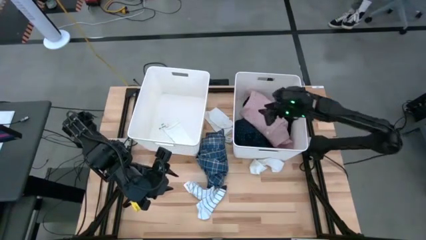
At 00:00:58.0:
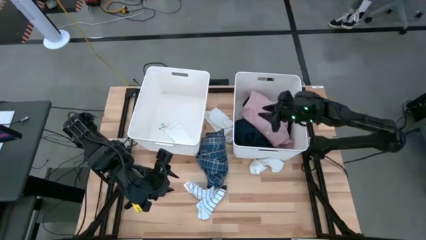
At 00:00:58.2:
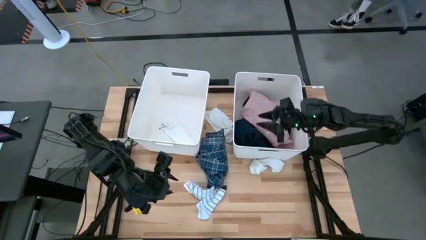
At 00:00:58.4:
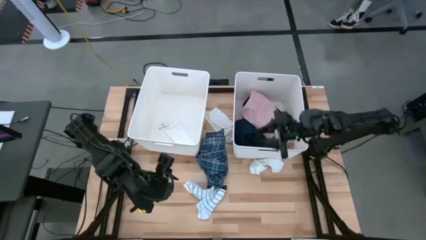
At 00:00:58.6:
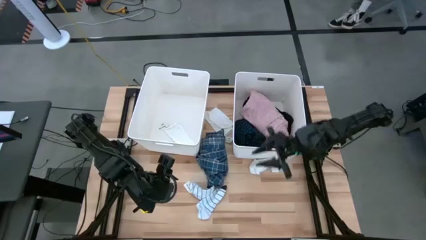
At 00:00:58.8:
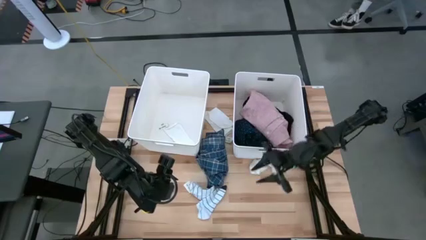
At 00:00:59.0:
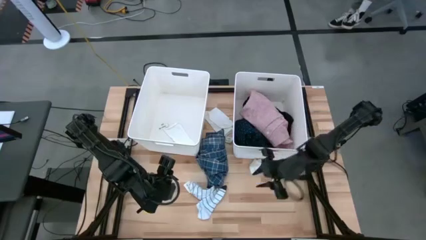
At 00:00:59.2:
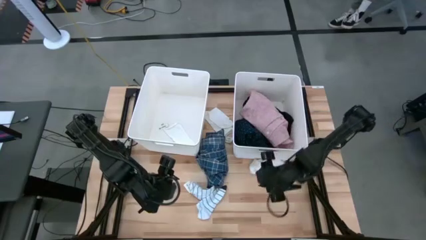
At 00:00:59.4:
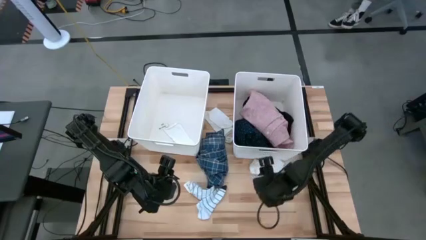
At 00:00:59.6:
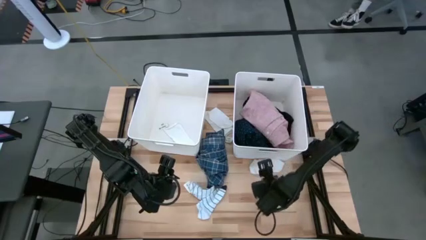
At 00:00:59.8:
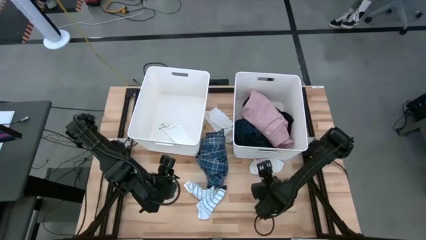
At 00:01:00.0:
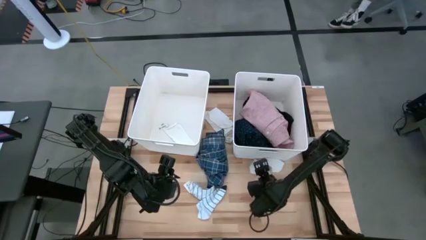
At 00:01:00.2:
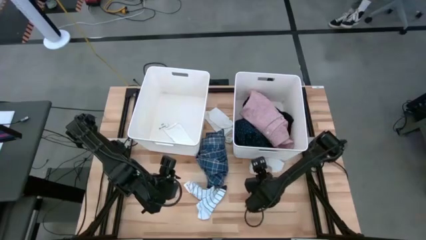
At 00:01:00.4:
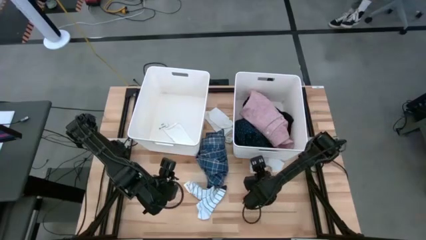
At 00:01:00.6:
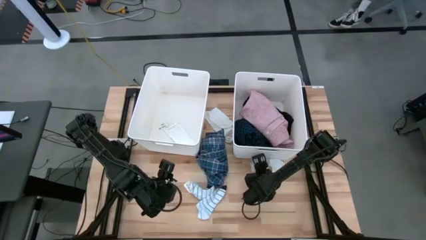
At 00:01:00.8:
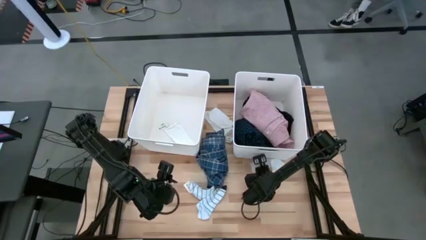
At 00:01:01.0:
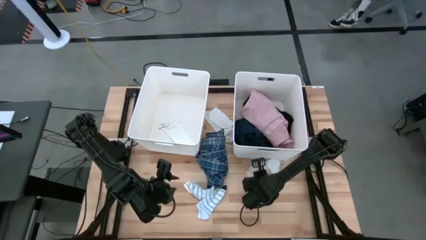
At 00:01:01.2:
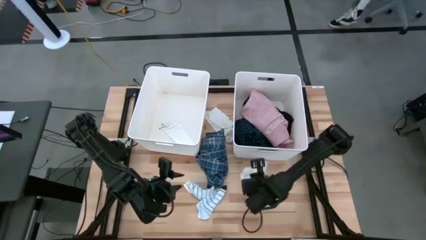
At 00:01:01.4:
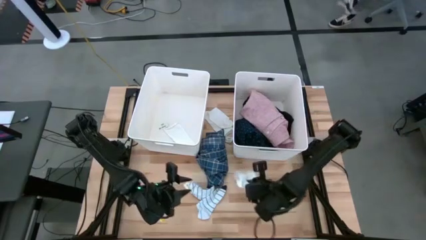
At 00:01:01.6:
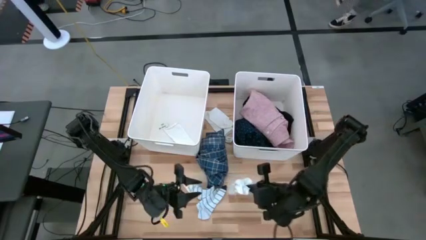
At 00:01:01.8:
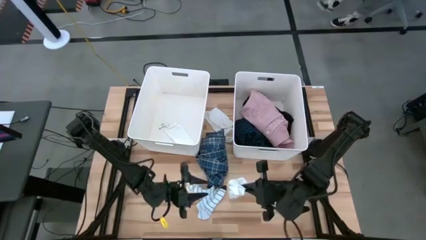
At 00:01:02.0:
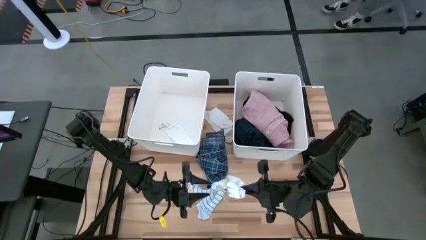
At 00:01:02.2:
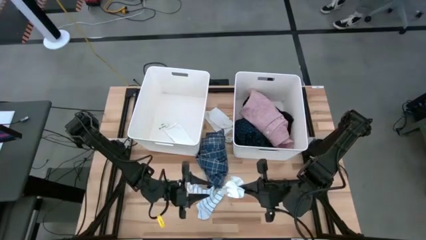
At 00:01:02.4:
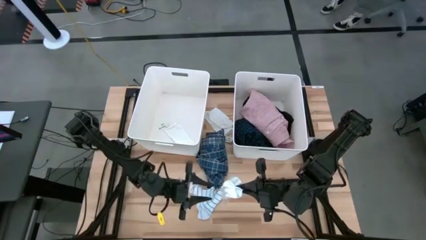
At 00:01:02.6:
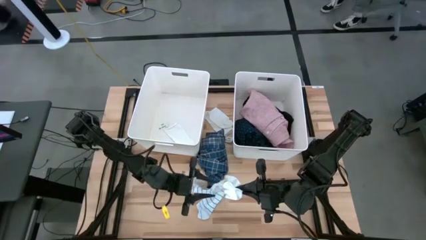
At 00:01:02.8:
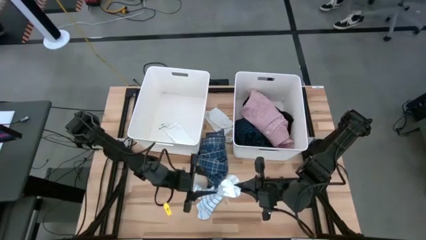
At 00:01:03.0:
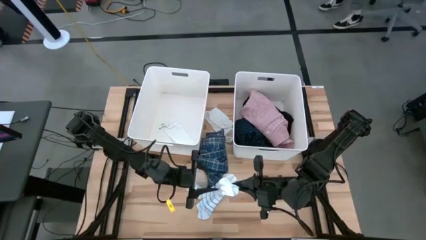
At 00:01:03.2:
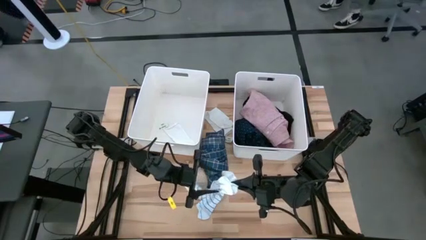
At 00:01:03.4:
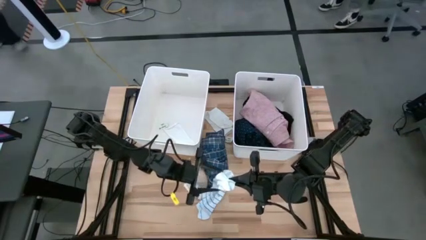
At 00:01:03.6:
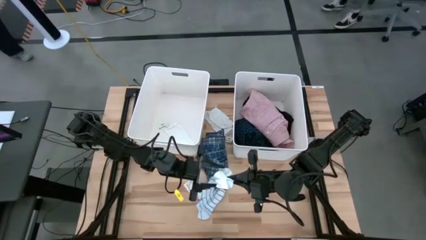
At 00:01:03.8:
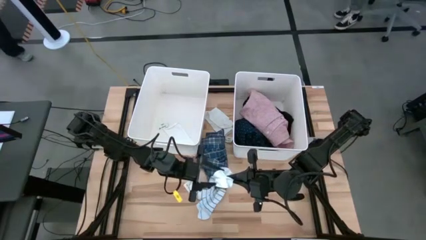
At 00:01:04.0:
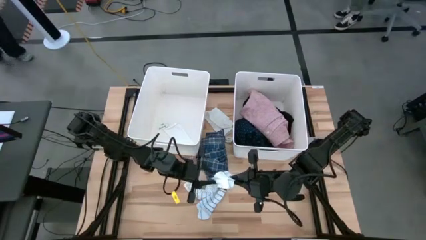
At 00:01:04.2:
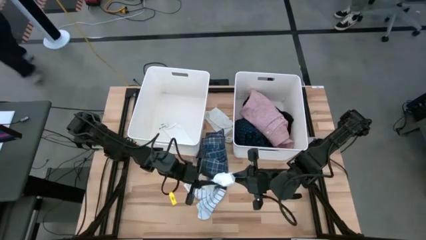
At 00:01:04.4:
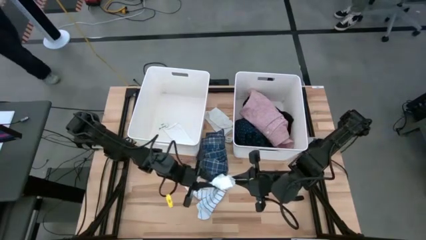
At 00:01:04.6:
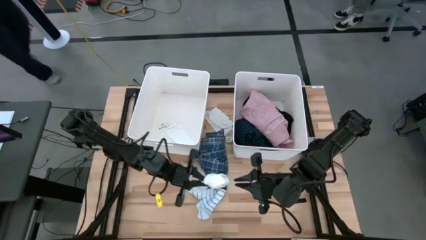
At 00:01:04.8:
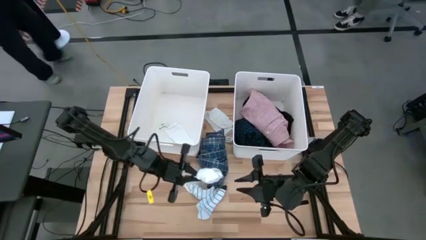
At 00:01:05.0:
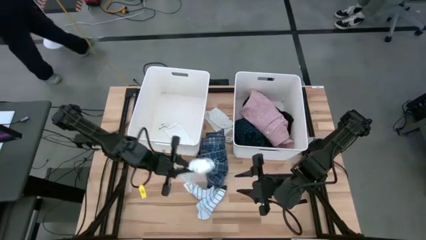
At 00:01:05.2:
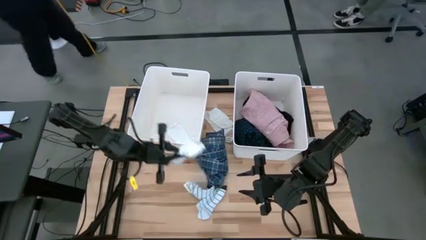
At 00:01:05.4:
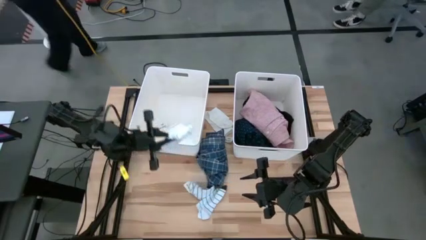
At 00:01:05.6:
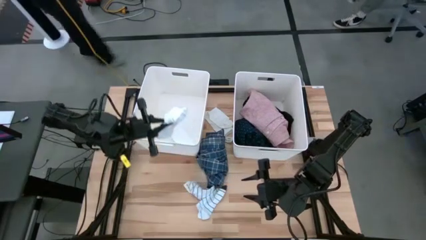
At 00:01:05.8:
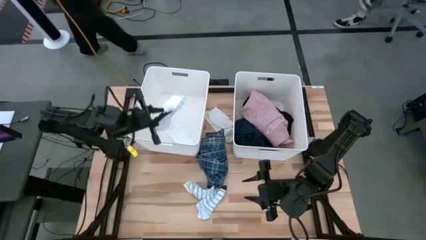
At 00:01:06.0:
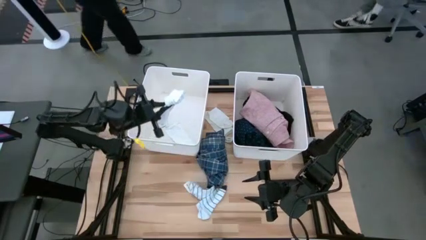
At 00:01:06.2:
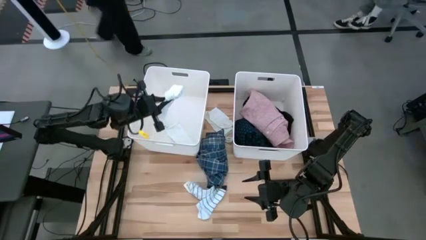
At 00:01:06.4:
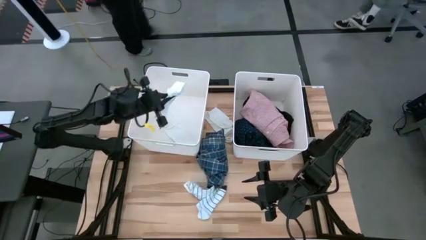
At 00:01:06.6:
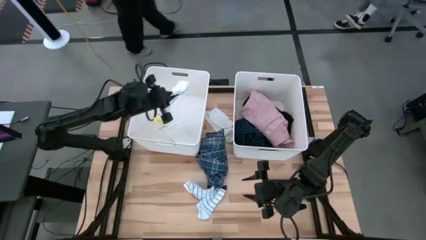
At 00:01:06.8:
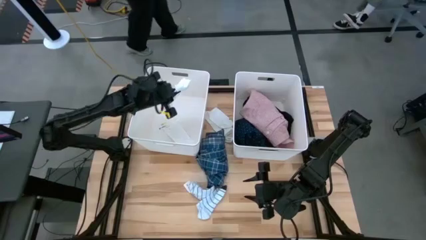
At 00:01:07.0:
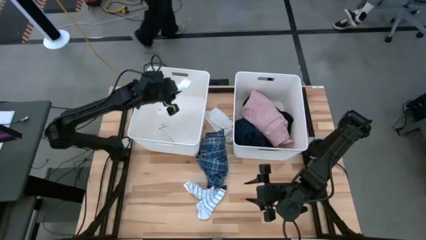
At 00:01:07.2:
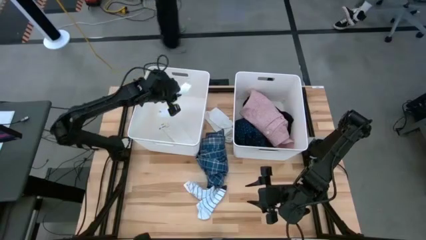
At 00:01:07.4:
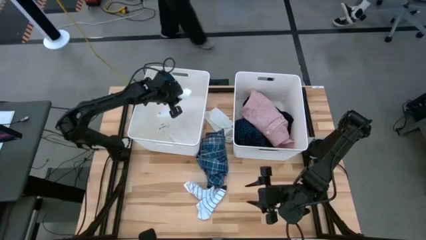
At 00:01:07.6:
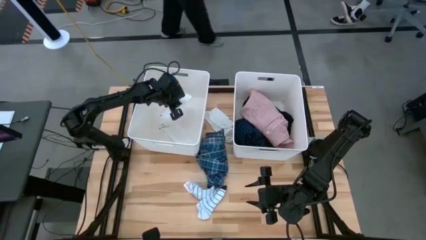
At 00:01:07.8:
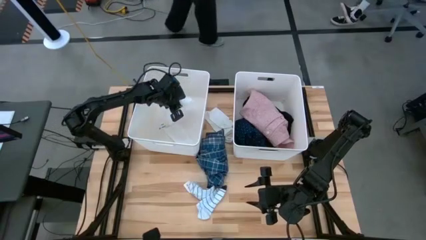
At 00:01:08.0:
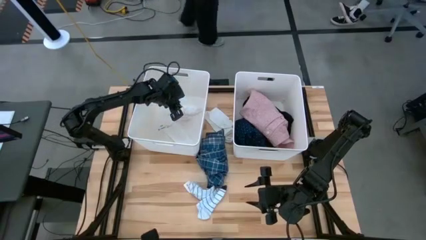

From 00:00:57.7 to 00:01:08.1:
Task: Sort clothes
Put the white pair of socks into the left white laundry bin

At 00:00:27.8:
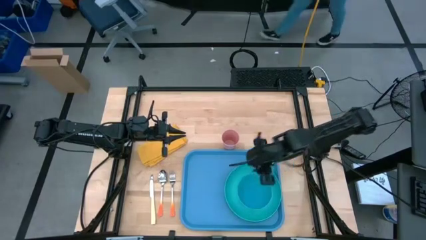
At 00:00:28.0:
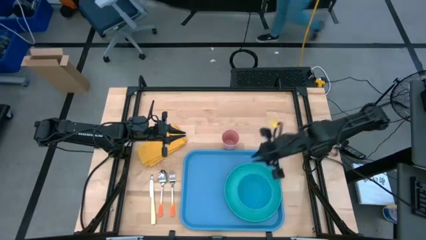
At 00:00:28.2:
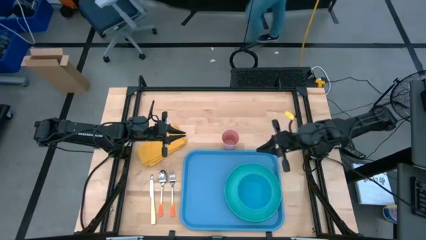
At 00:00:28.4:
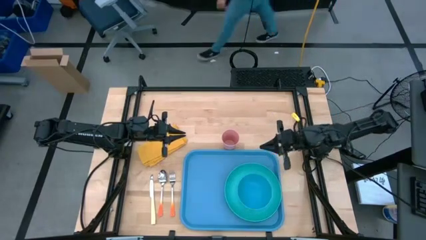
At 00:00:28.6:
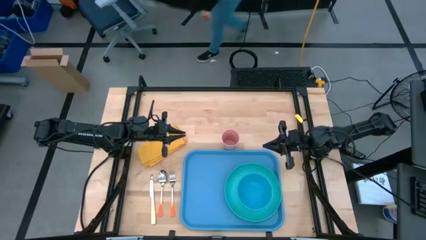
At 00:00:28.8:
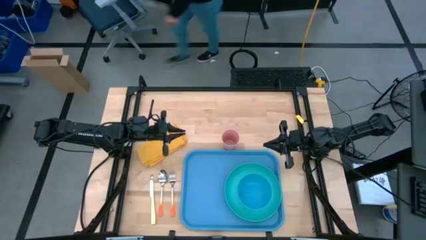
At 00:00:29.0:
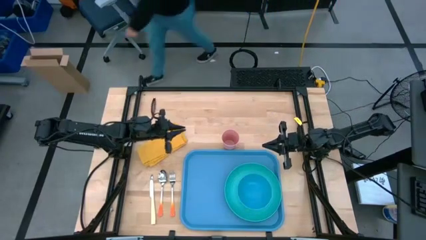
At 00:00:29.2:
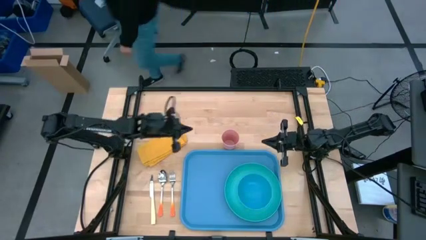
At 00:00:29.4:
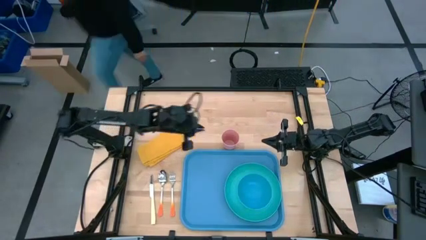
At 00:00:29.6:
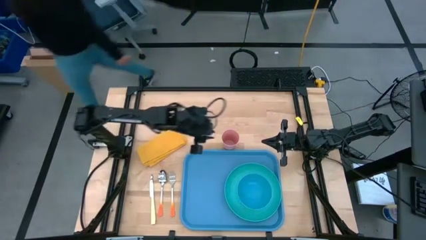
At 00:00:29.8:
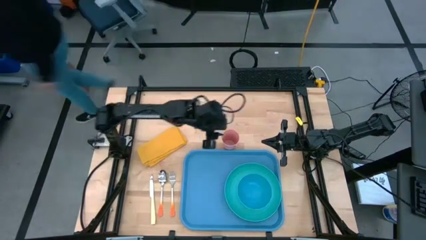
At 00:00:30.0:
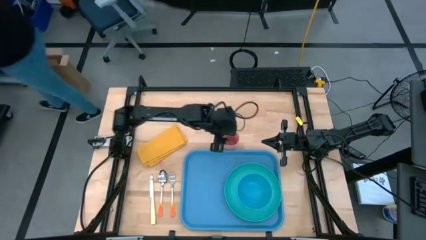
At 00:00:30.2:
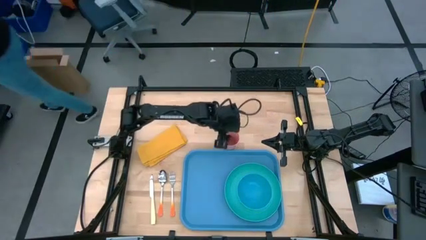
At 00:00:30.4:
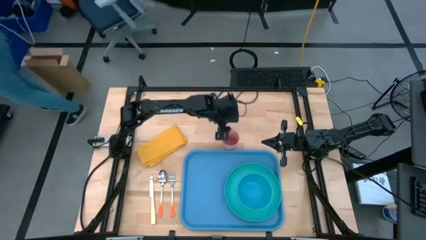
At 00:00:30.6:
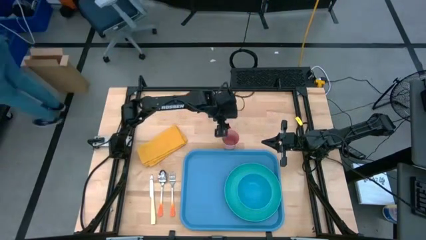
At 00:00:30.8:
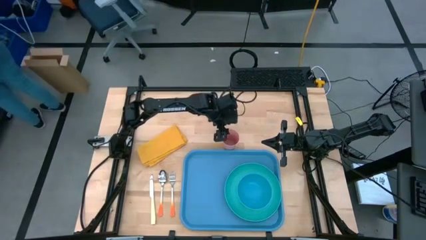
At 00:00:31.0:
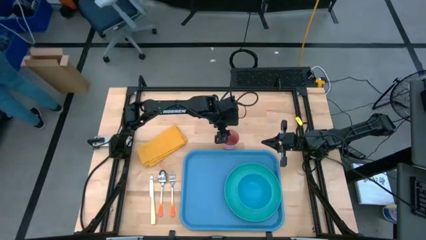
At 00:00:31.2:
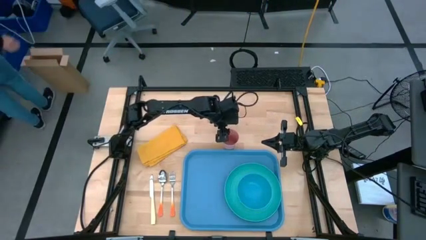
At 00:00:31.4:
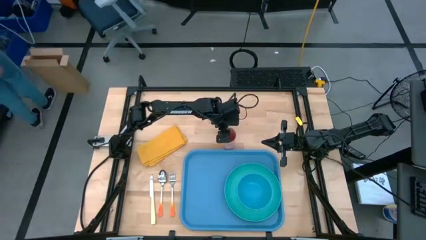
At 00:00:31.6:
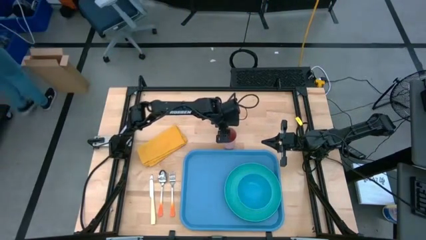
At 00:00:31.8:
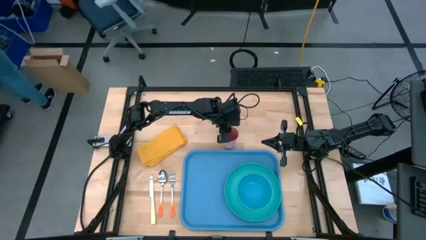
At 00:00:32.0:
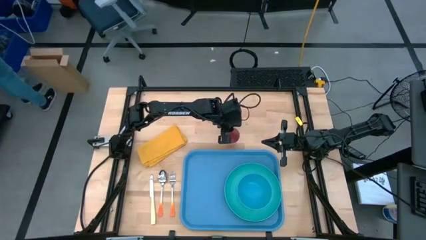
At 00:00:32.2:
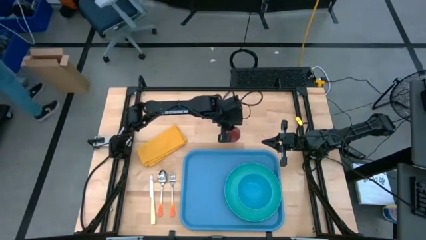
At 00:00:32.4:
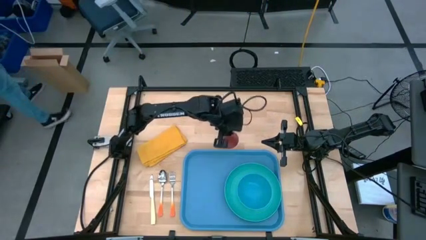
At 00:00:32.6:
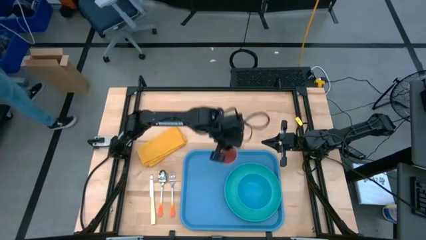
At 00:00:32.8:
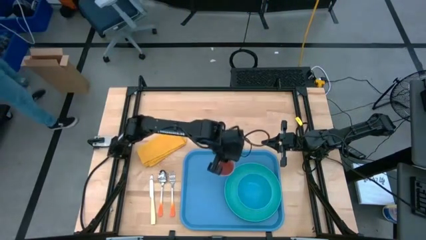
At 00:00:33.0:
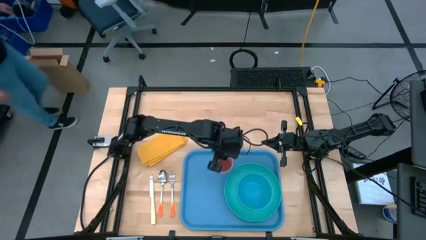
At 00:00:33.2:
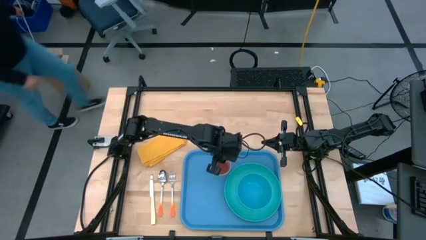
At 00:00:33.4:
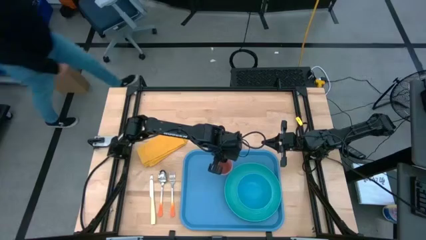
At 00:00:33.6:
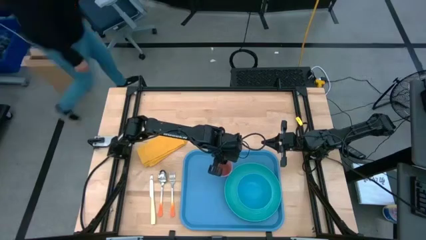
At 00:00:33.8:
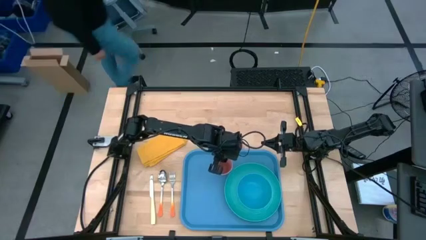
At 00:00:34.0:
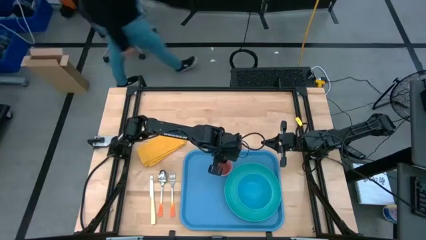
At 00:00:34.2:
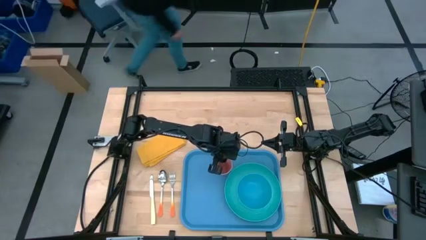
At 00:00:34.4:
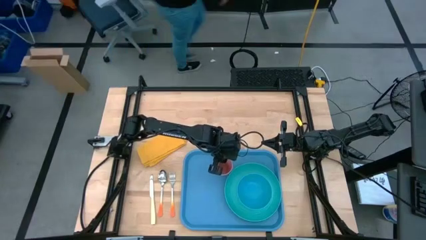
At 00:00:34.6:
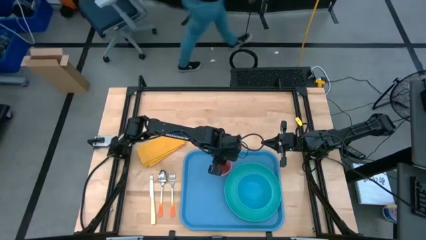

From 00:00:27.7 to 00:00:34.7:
Task: Set up tray
Put the pink cup on the blue tray to the top right of the blue plate
